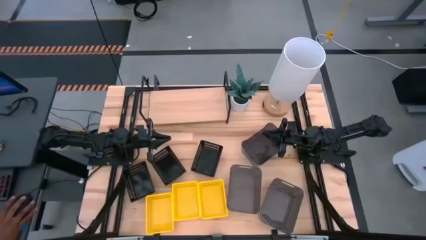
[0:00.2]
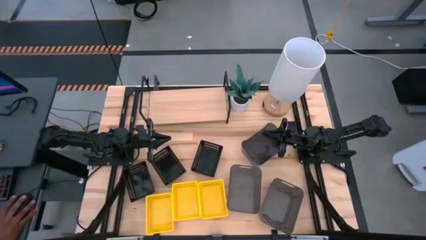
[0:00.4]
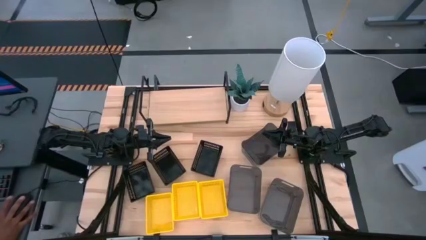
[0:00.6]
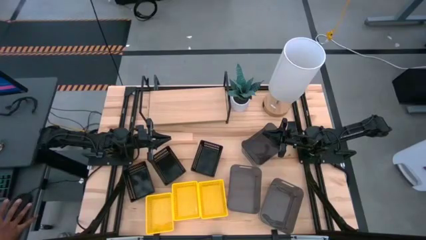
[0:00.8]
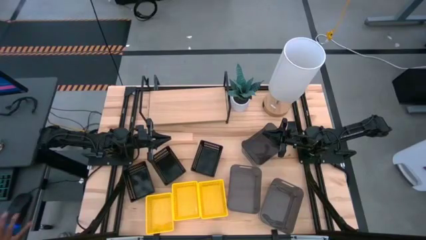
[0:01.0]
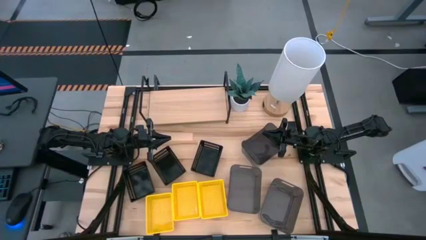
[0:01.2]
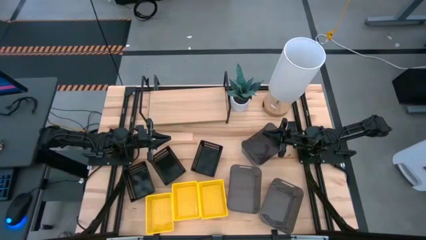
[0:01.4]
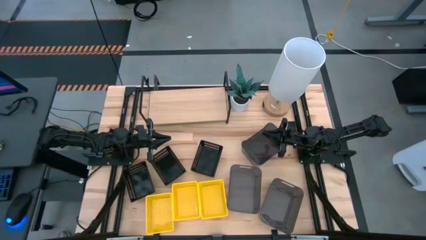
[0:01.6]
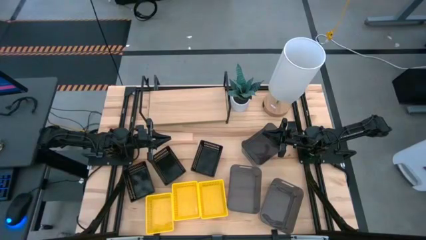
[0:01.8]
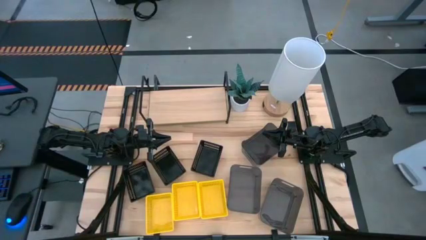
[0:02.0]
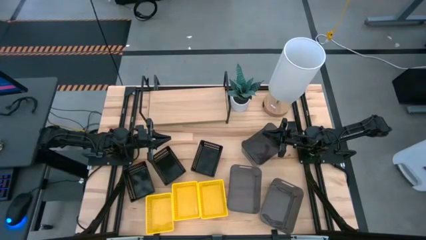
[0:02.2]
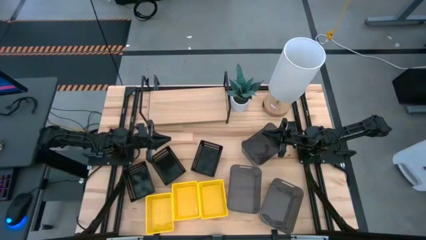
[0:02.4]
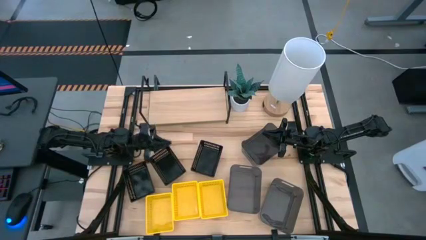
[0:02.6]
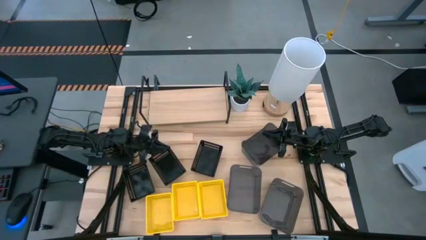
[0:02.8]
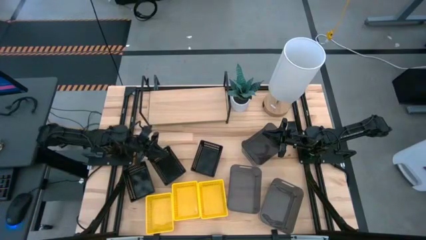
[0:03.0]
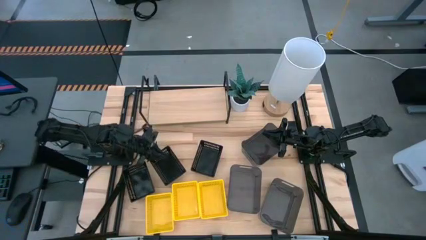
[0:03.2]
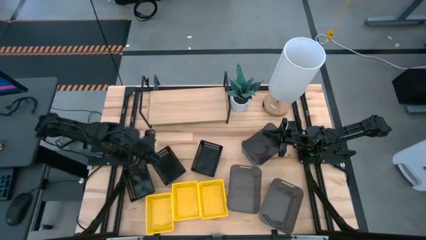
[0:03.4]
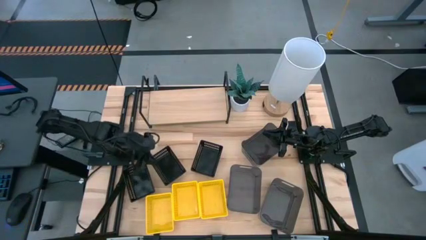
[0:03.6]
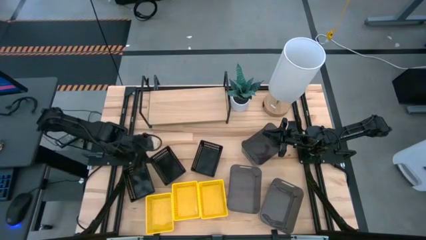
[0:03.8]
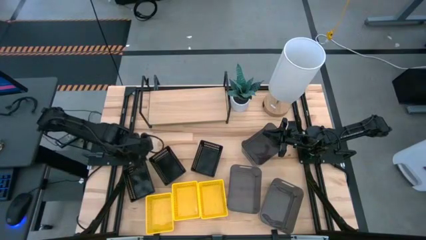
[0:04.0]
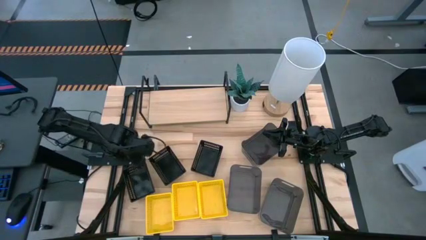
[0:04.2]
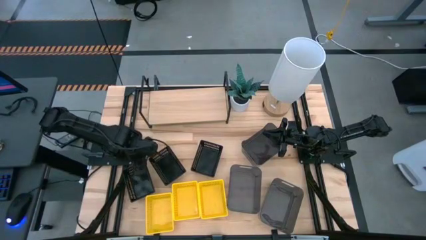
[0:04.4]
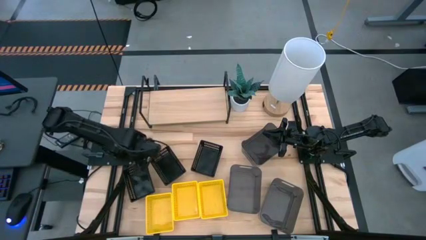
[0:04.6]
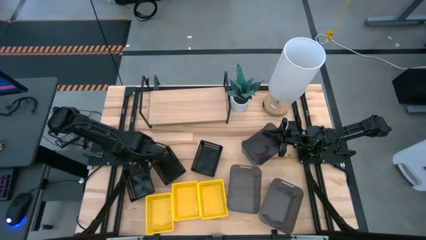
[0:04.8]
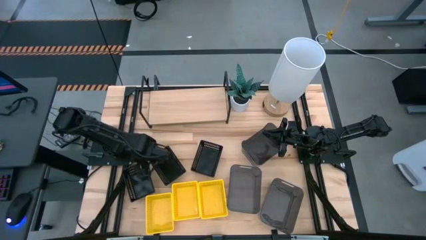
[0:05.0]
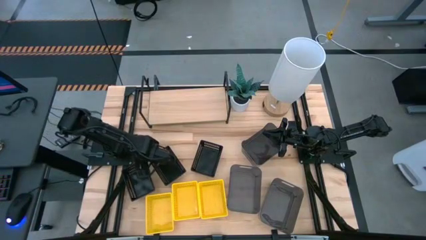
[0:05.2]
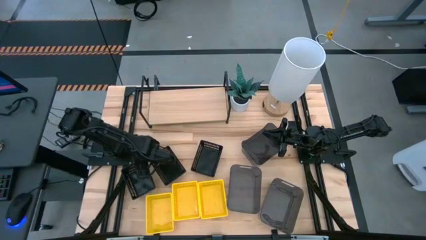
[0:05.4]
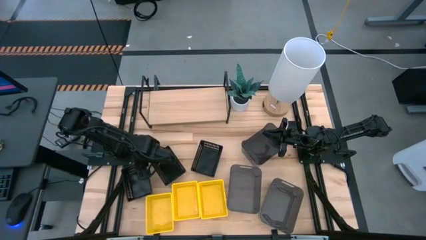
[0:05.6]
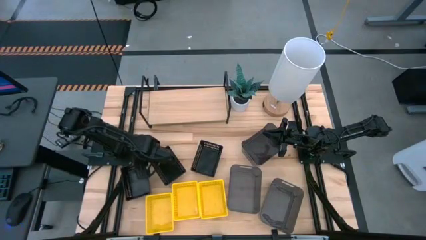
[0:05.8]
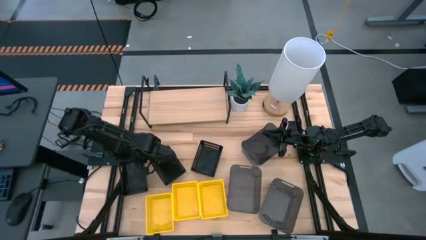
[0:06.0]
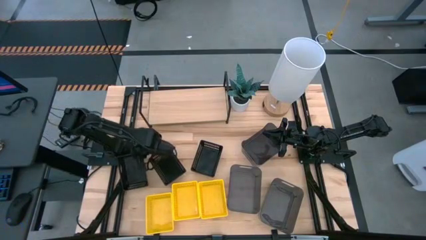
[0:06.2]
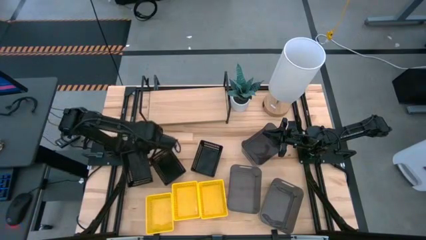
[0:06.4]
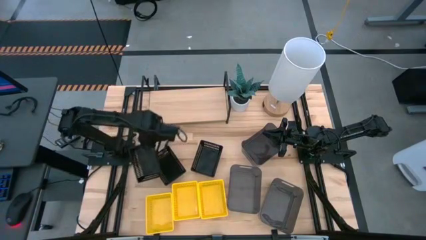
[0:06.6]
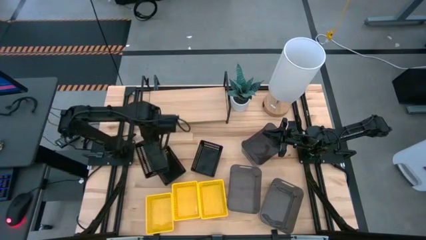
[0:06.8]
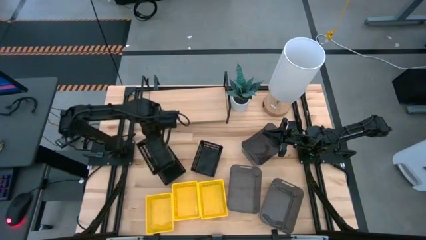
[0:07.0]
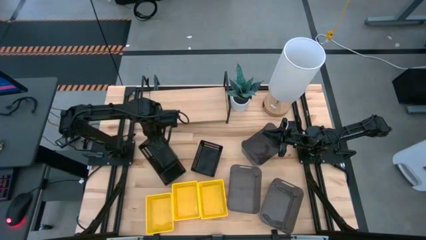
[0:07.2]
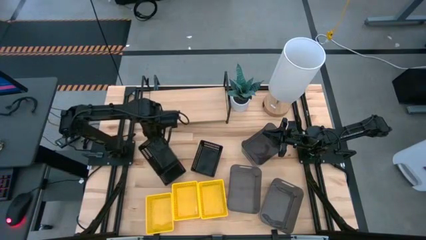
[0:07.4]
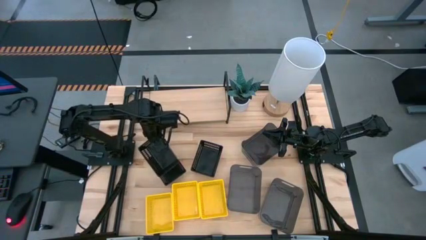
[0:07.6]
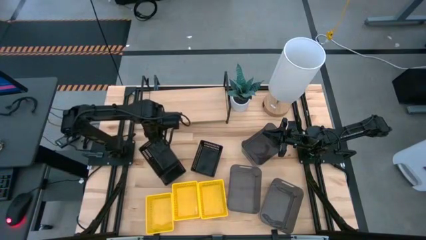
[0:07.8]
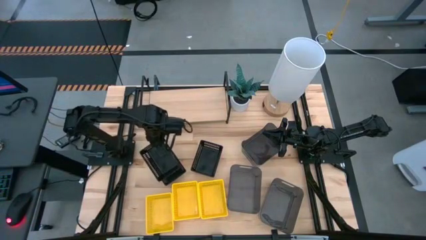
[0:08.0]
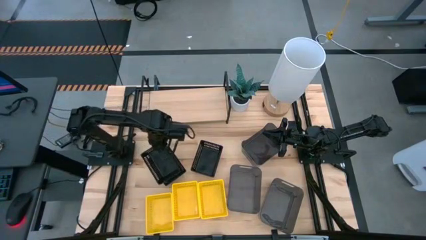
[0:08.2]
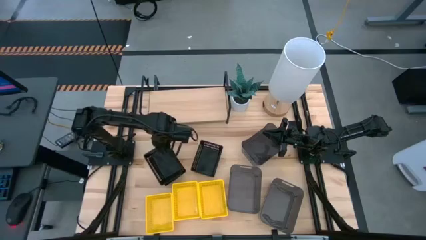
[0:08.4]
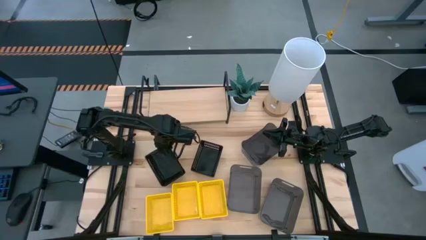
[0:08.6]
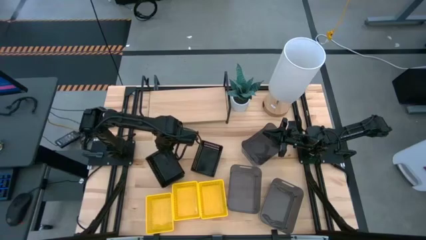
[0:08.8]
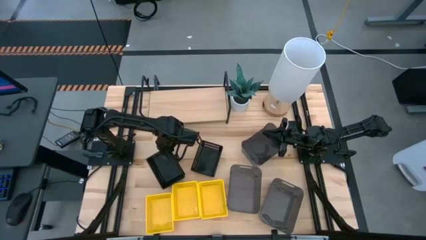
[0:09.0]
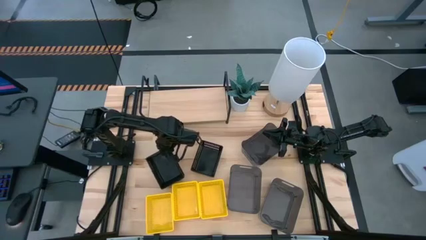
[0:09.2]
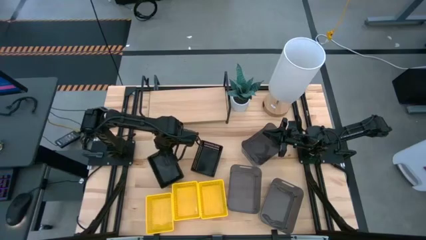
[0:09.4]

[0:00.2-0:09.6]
Task: Stack baskets on shelf by color
Stack the left black bin on the middle black bin

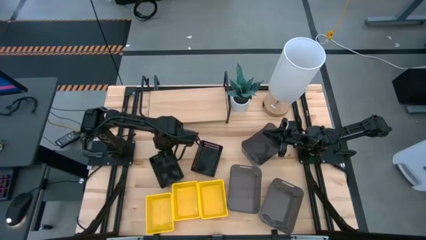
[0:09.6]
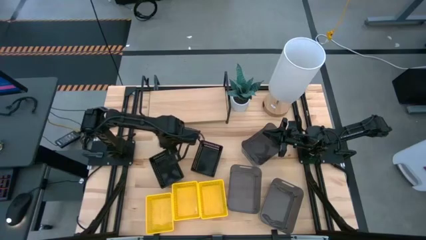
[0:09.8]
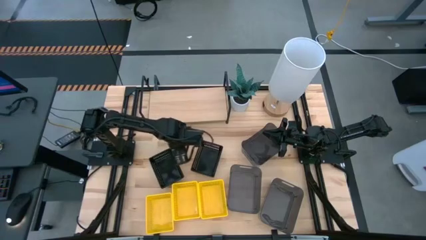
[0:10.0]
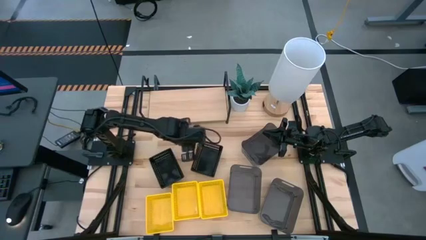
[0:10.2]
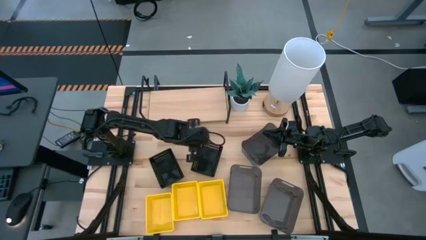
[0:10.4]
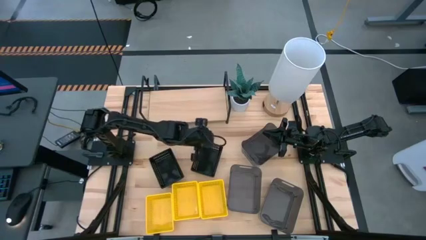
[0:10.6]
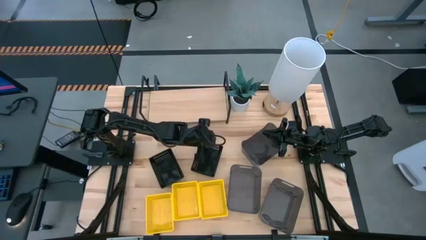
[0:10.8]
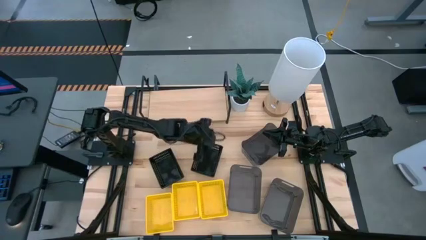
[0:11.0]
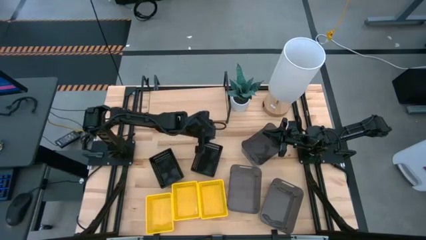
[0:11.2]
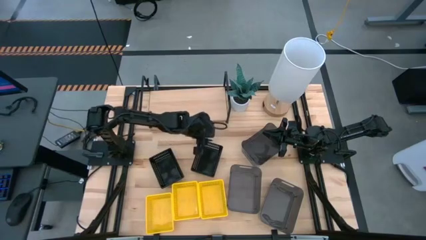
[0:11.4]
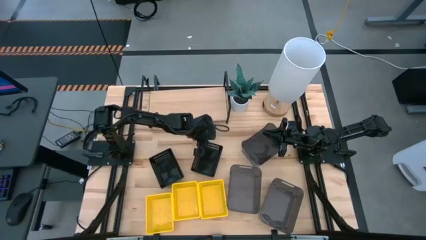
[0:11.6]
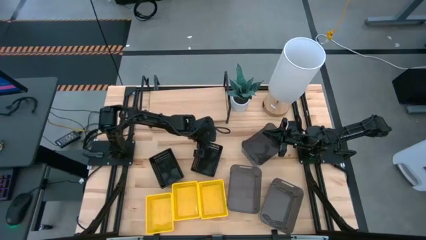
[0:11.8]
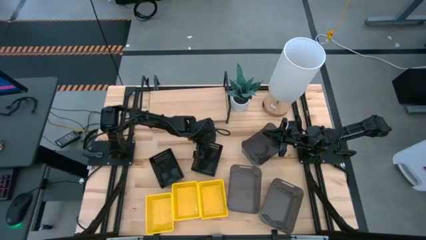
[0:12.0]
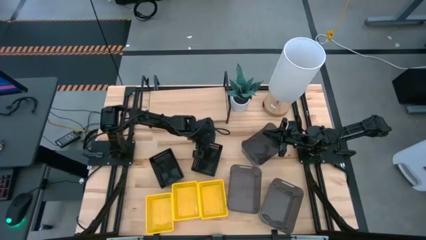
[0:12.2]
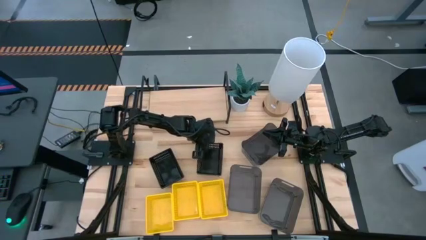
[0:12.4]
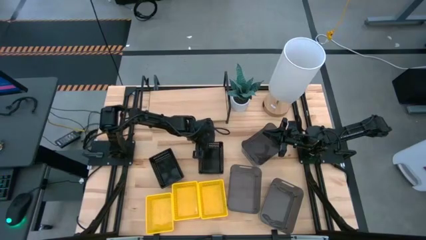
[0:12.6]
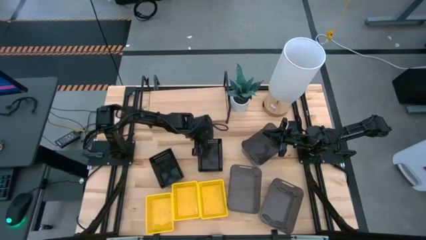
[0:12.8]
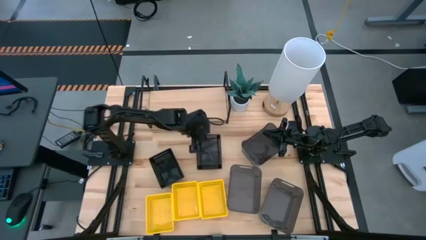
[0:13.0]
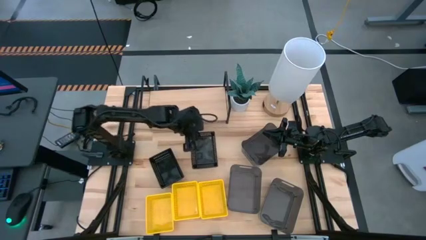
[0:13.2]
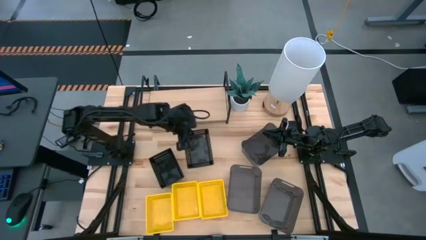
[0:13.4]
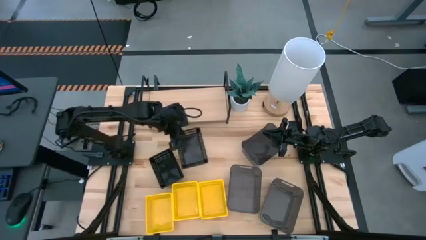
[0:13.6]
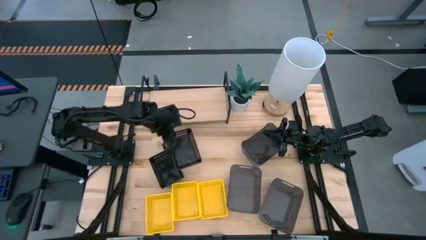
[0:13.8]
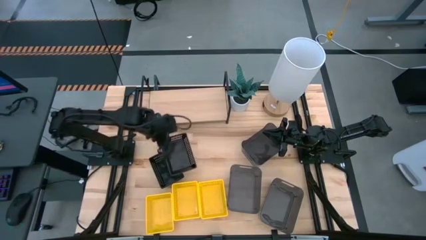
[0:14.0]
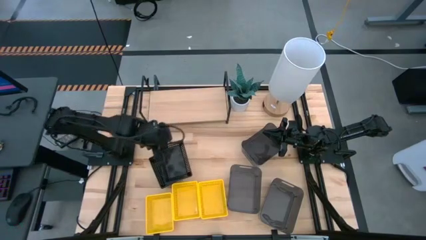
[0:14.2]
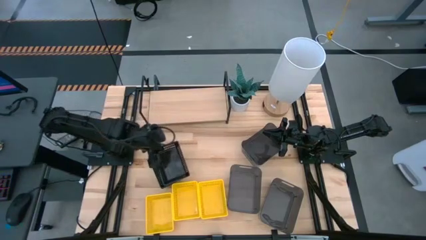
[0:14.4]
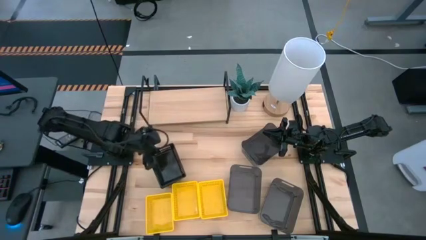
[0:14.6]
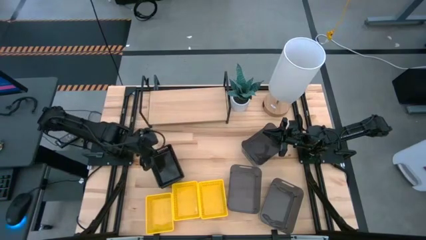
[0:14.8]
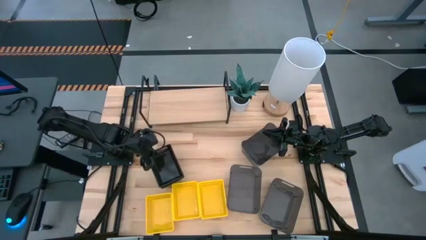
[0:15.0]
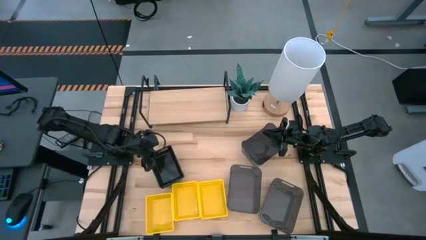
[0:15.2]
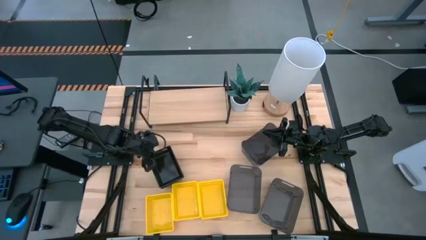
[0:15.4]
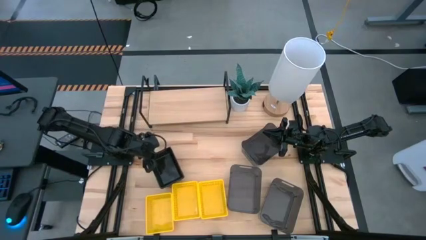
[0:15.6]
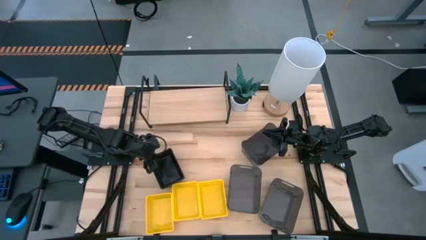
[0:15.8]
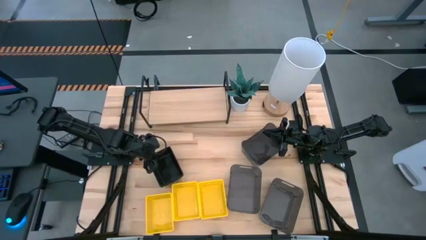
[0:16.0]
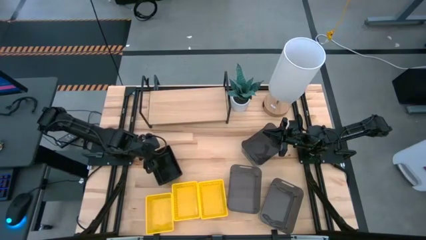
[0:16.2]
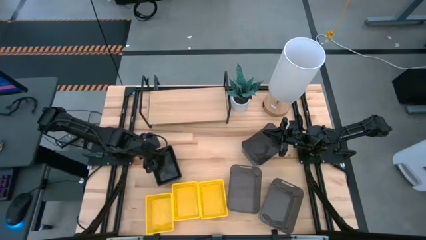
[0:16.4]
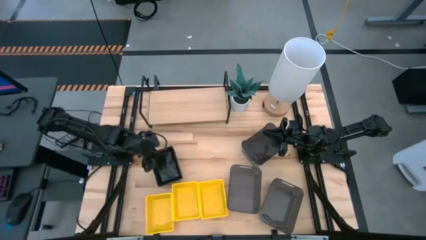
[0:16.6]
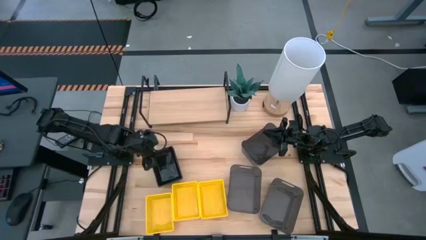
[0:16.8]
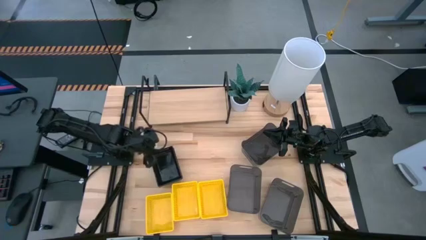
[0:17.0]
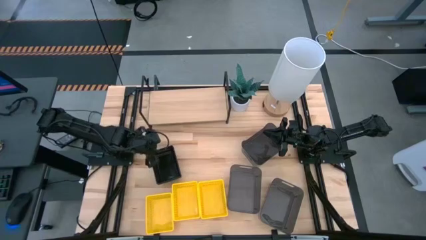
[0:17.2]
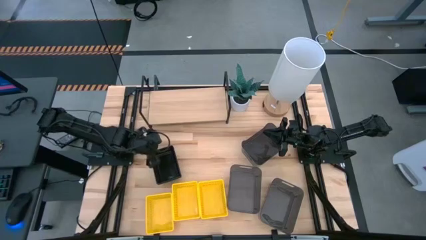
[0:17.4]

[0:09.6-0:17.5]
Stack the right black bin on the black bin
